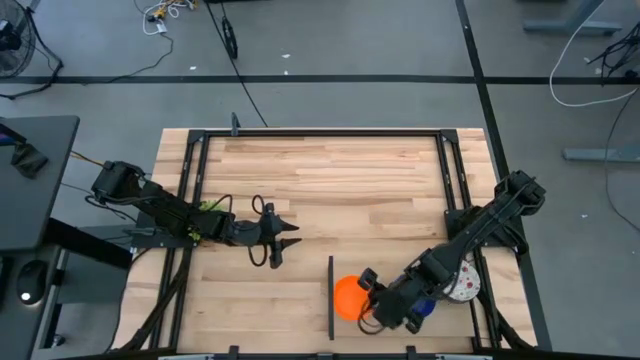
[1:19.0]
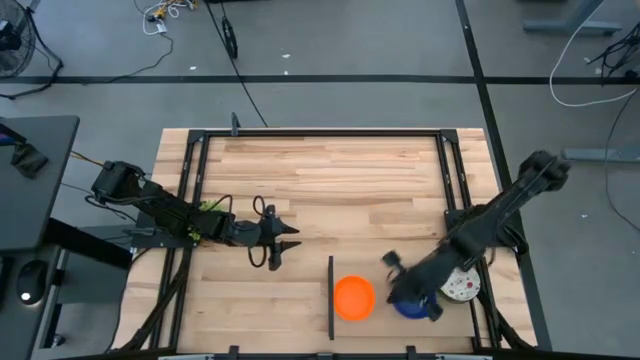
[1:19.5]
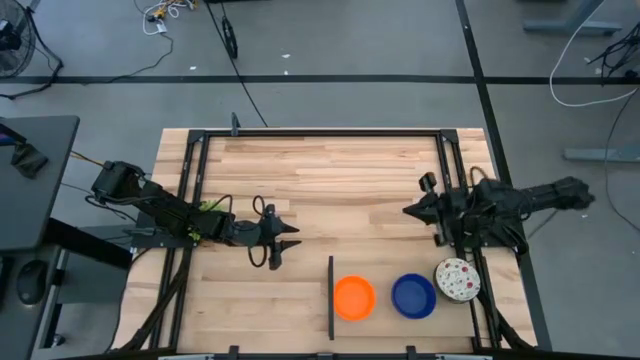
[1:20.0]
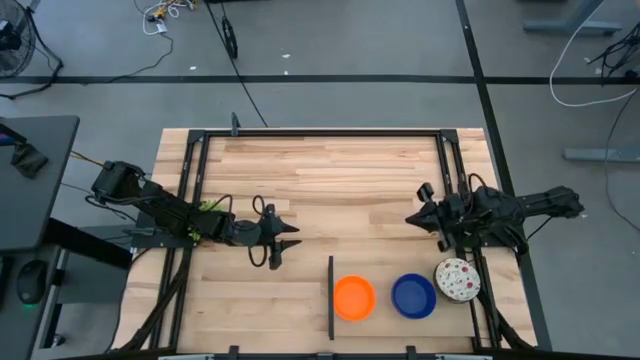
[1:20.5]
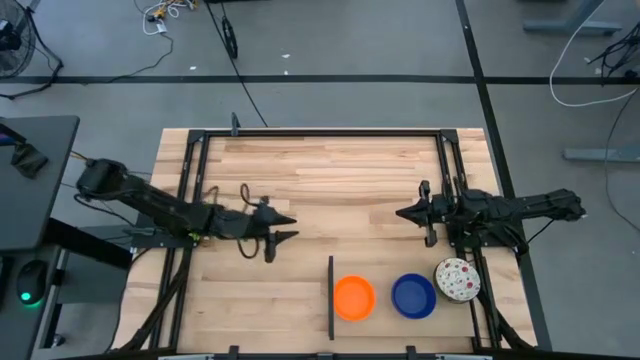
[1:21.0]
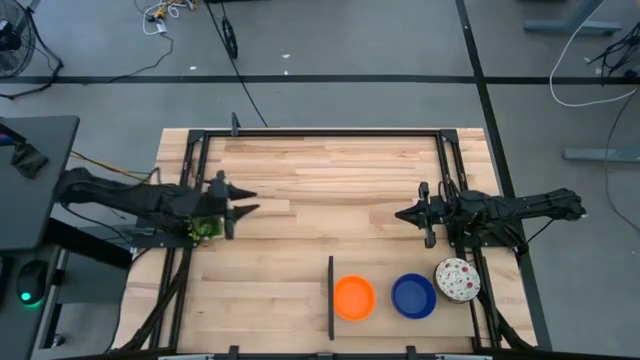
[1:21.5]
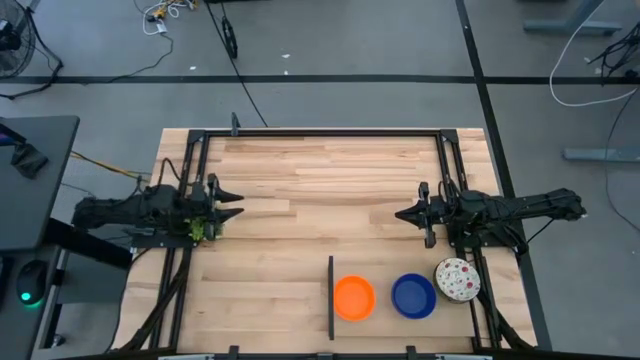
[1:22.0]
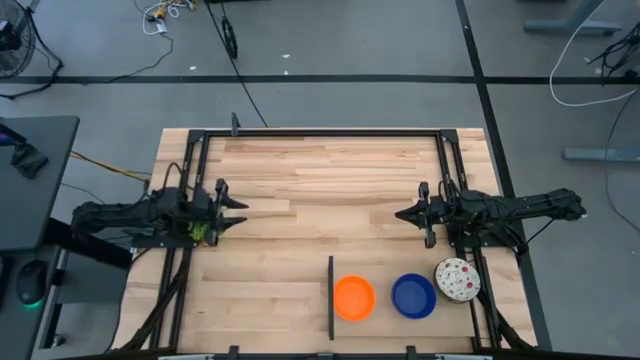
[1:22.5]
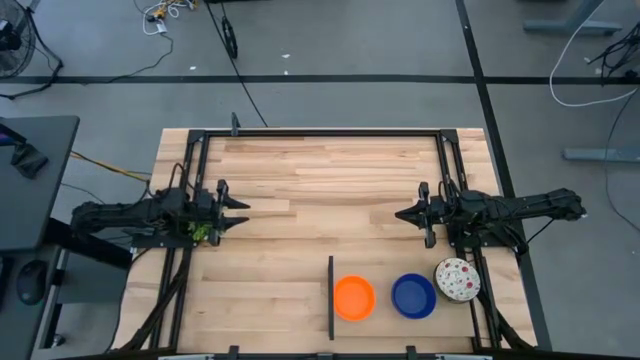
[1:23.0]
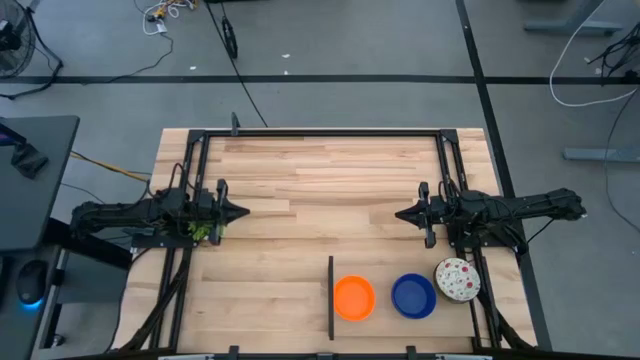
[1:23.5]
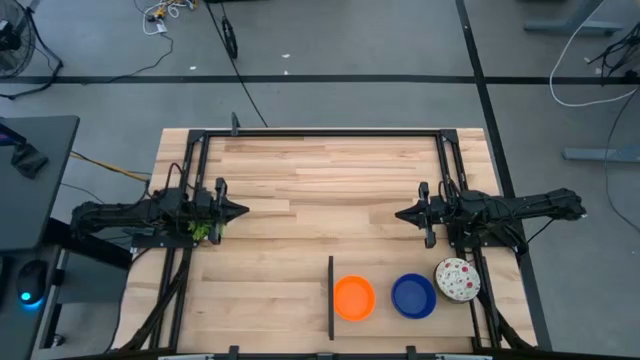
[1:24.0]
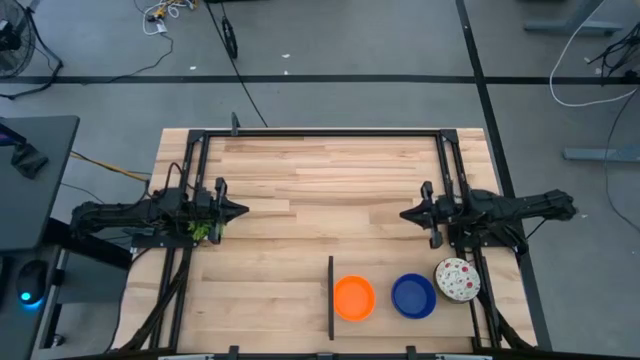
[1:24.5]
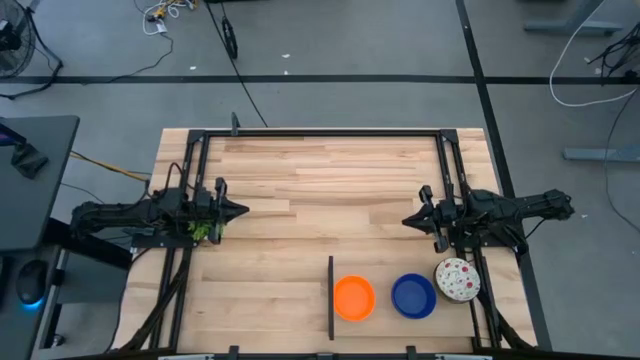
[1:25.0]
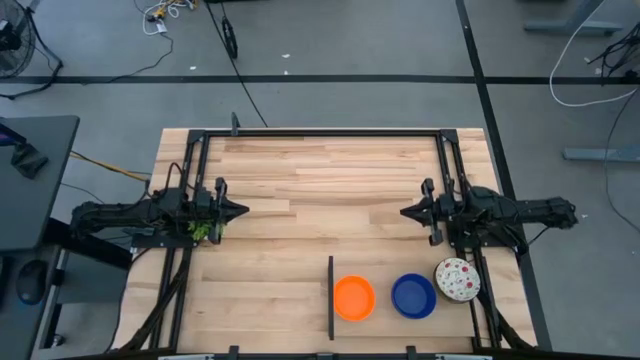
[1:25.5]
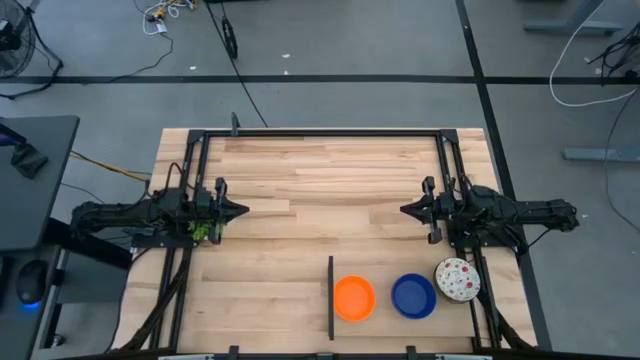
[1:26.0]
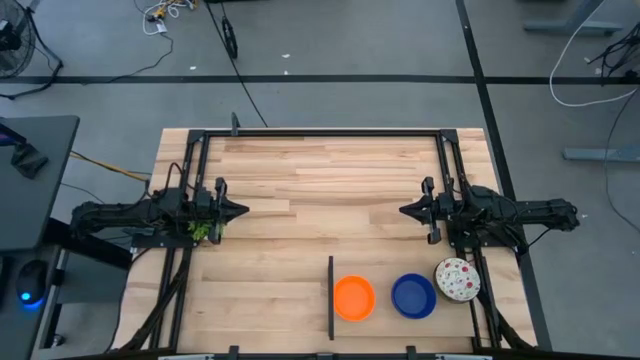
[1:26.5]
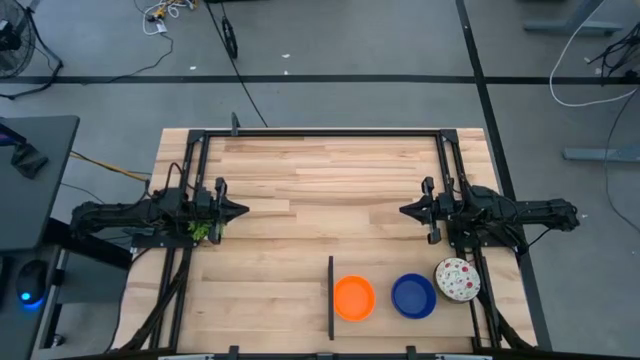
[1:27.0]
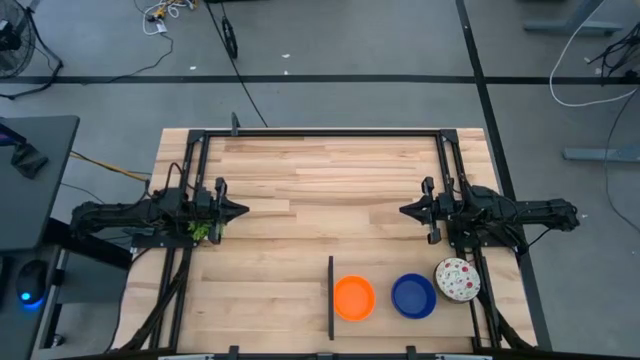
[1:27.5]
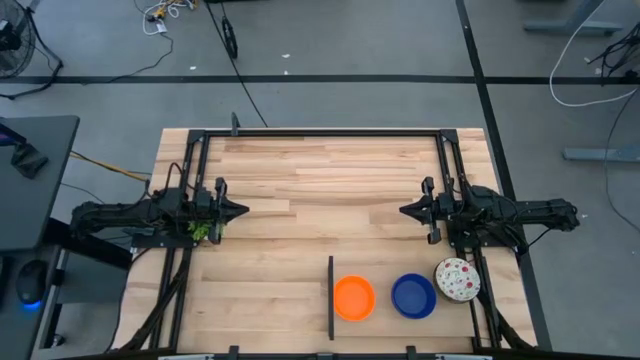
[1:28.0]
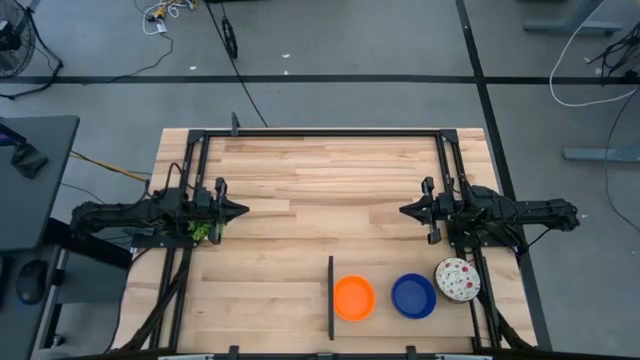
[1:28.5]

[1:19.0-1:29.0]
Task: Pick & Place Mini bowls
Return to Home Position

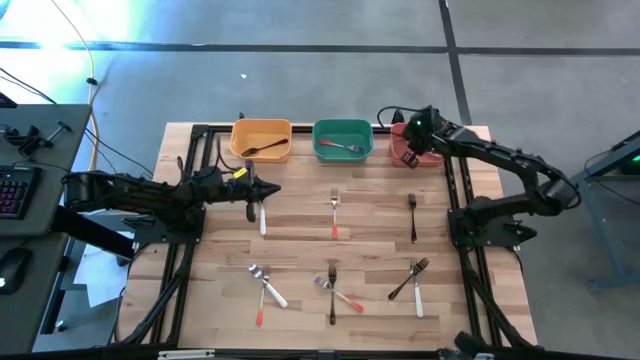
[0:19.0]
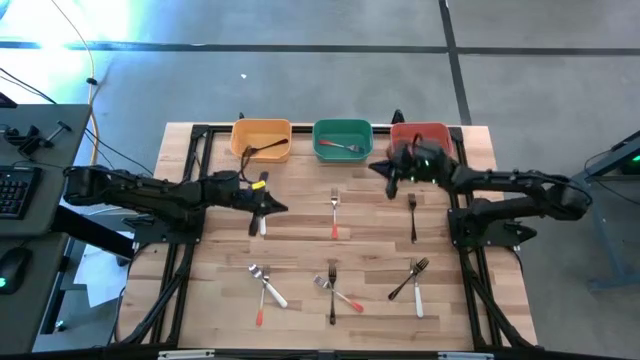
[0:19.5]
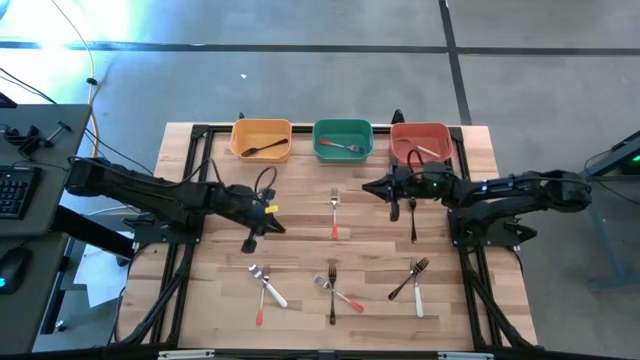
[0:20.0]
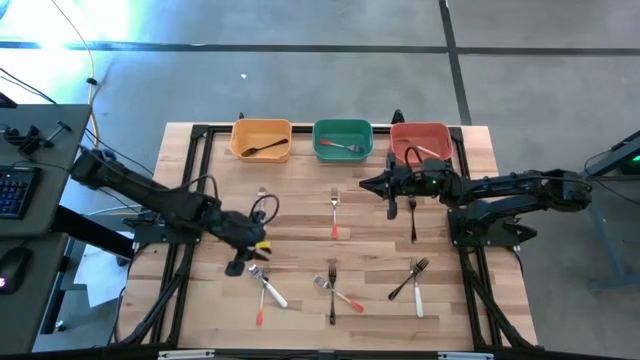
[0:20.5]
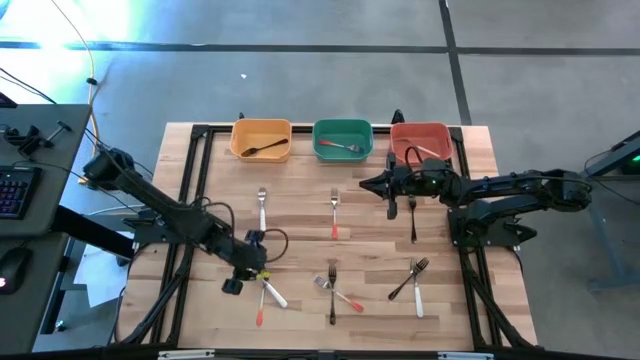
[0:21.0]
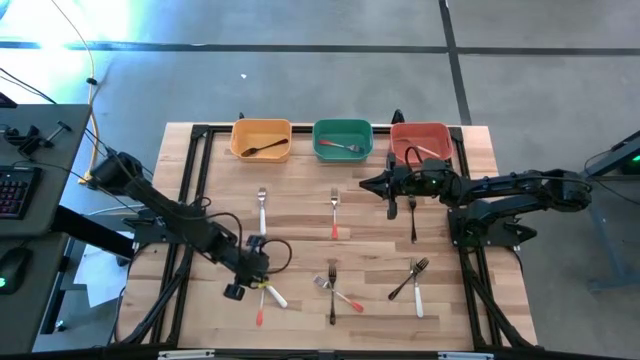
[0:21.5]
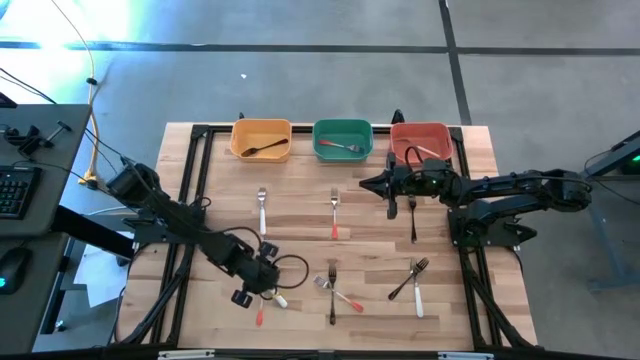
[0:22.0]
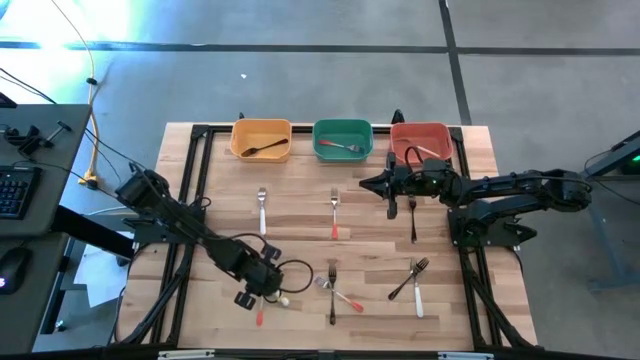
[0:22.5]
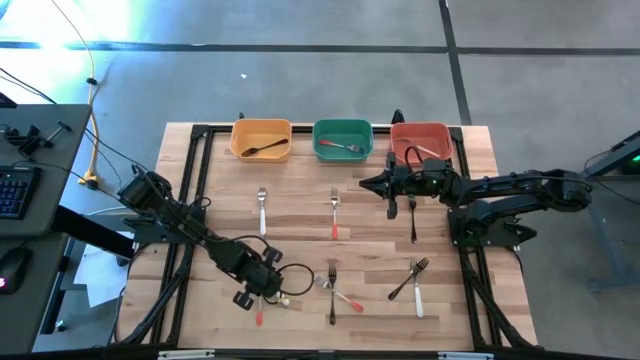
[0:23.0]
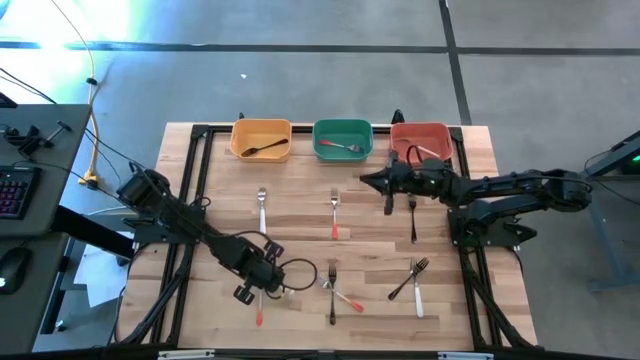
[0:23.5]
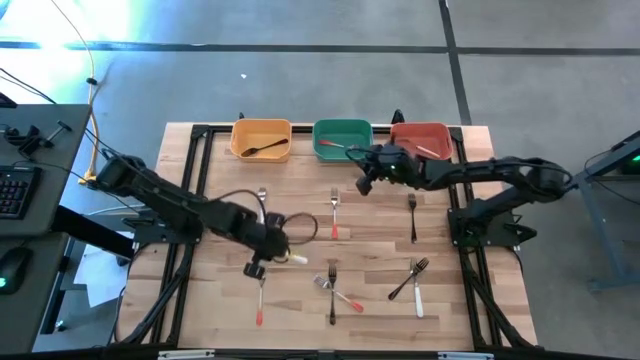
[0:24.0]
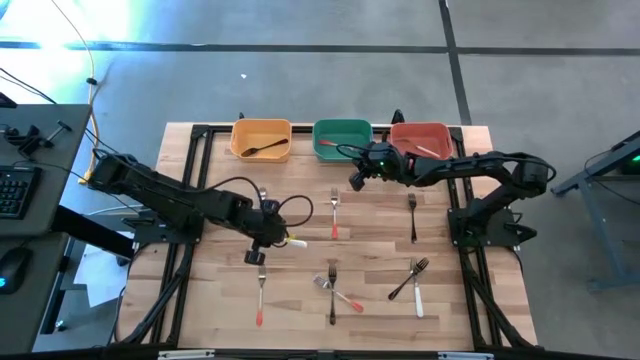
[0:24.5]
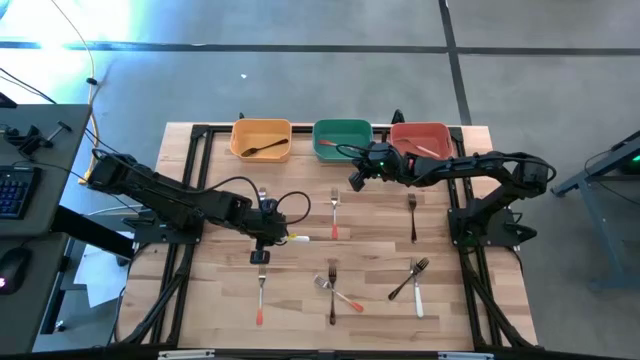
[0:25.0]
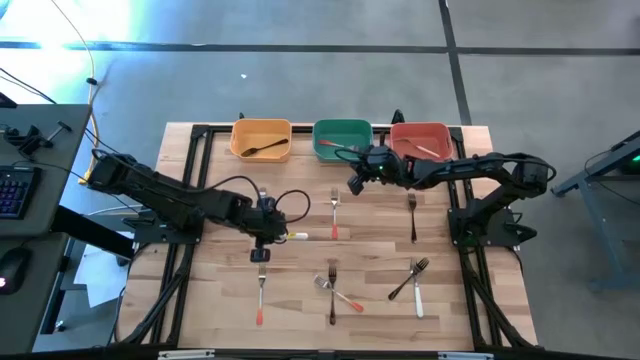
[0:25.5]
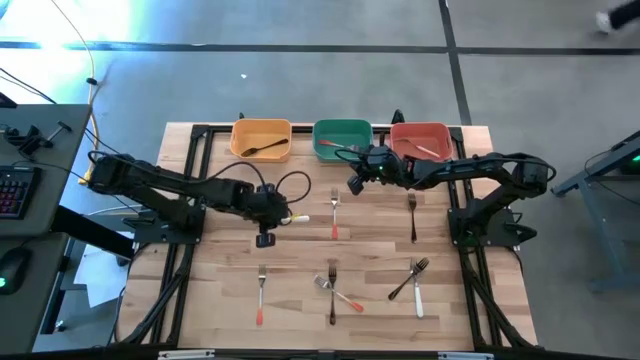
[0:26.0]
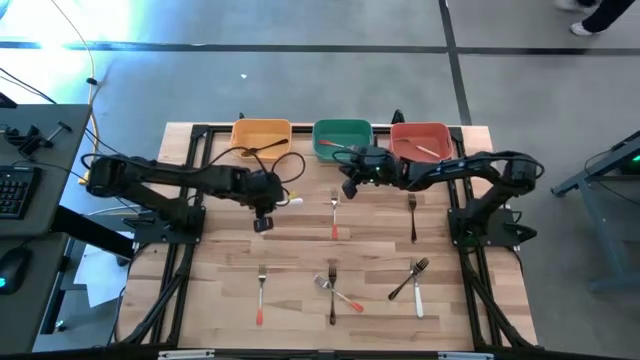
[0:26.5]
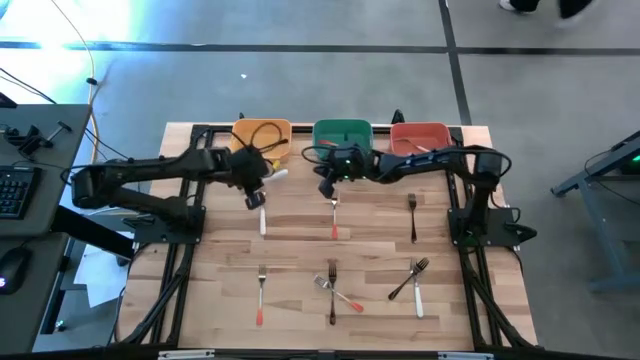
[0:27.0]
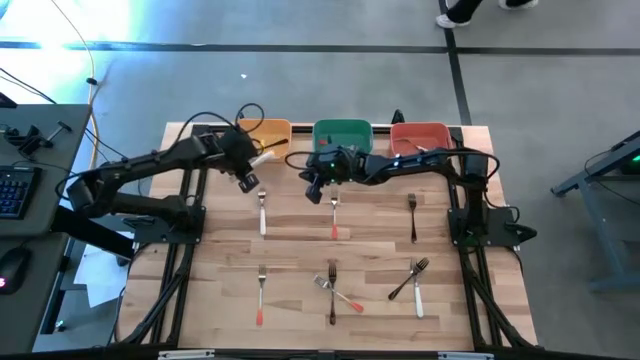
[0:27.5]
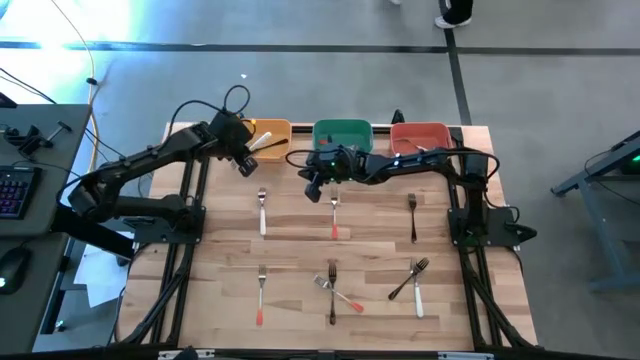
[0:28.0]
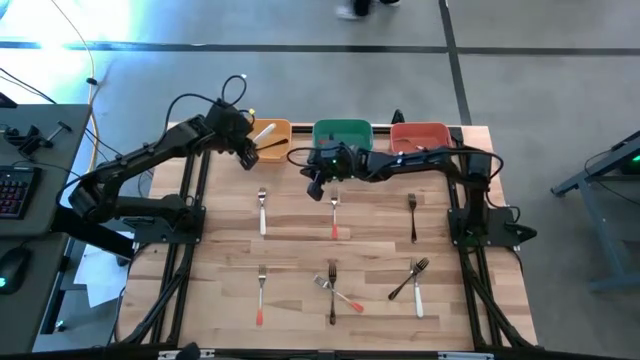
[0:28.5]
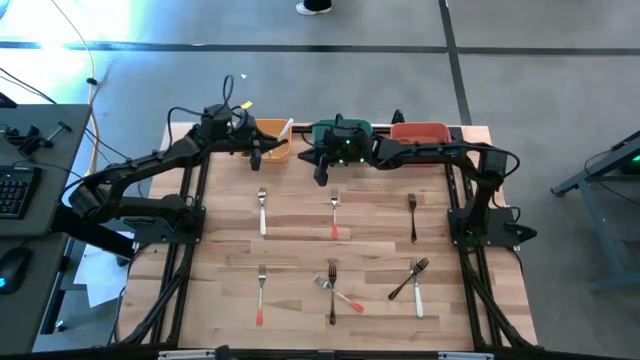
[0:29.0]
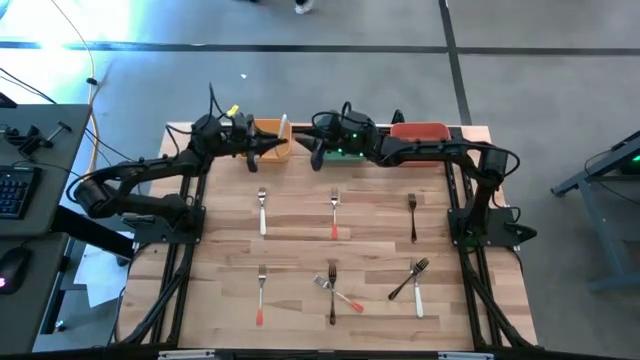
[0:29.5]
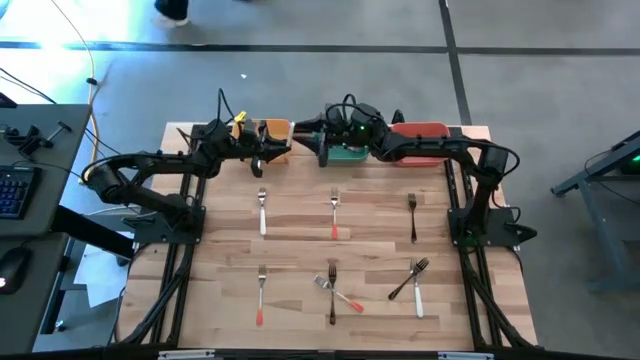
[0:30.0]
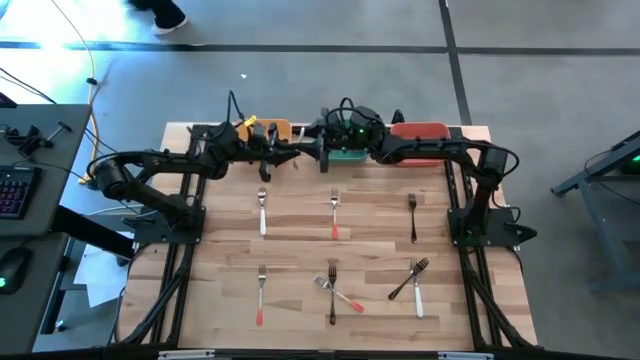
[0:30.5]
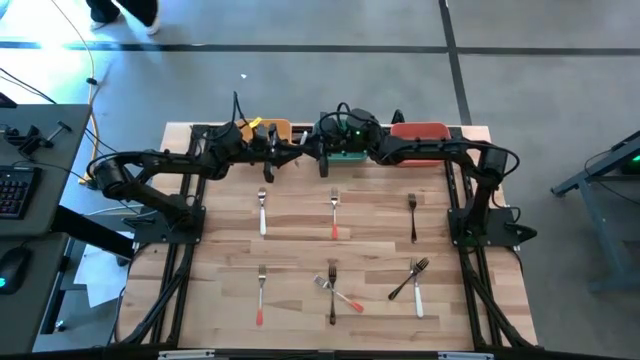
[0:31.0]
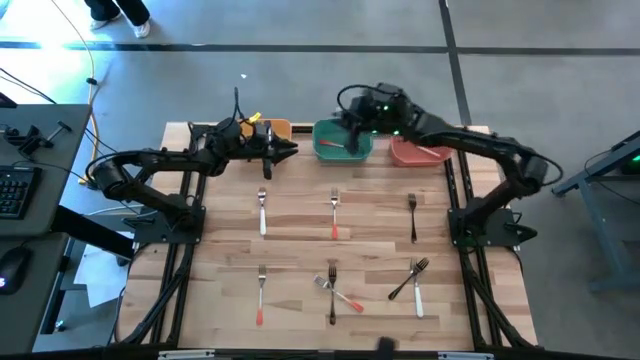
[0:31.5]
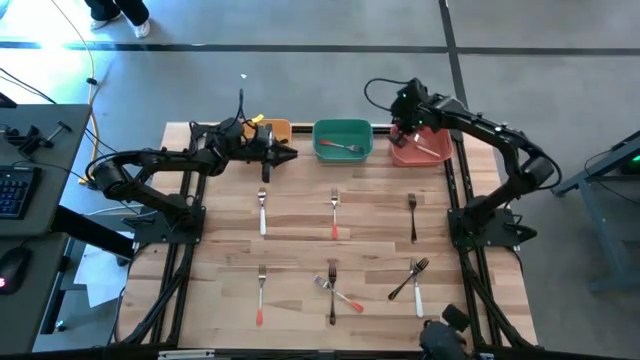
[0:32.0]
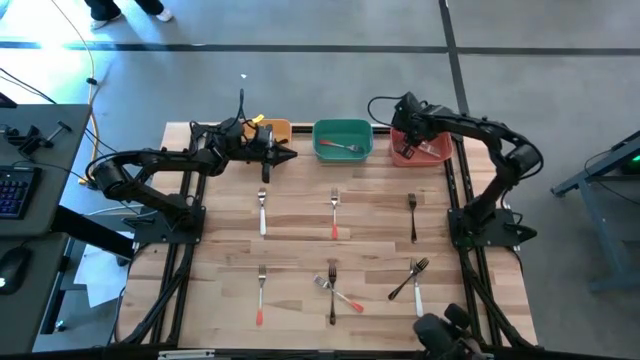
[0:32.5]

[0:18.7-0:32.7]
Task: Sort silverware by color (type)
Put the bottom left white fork into the orange bin
